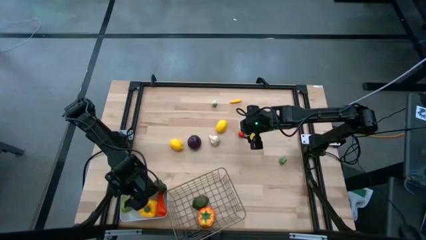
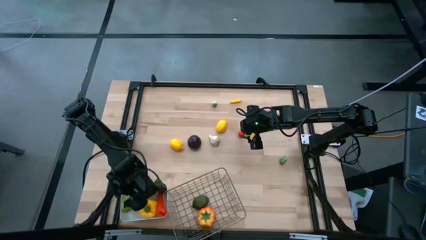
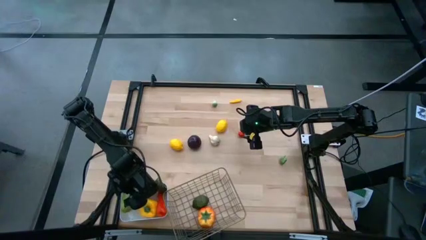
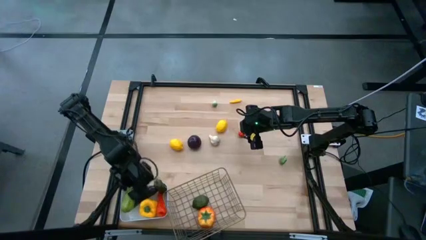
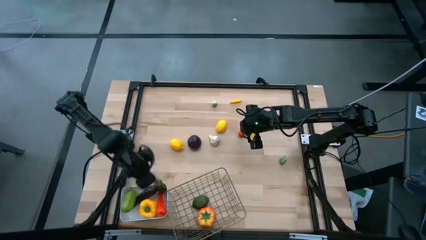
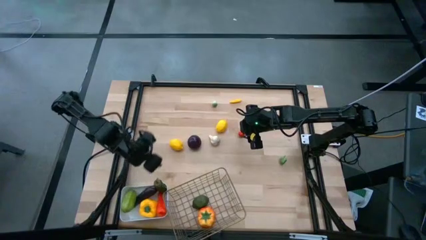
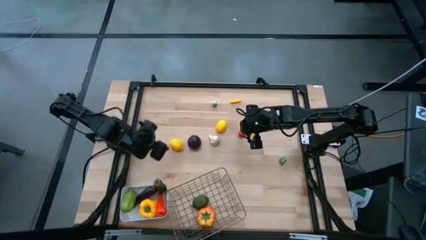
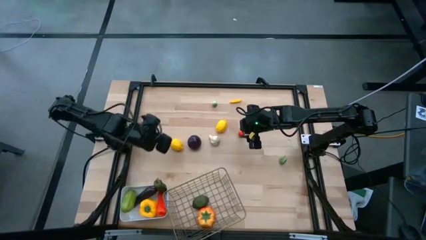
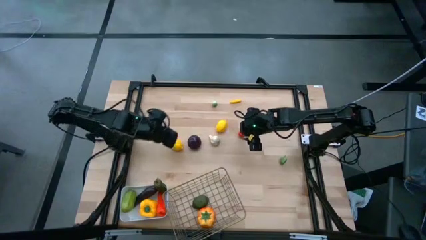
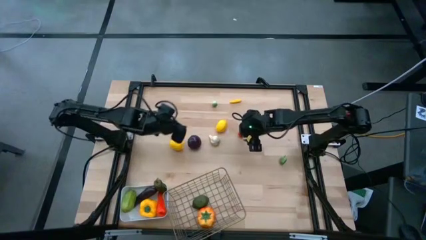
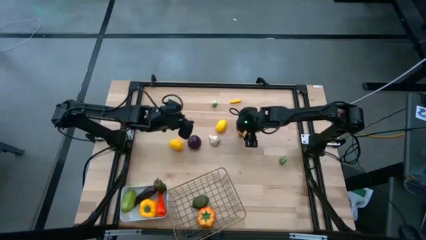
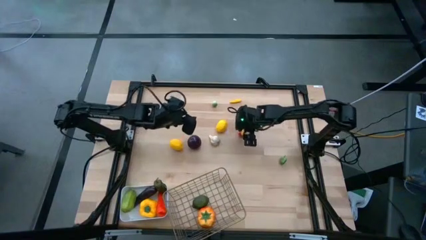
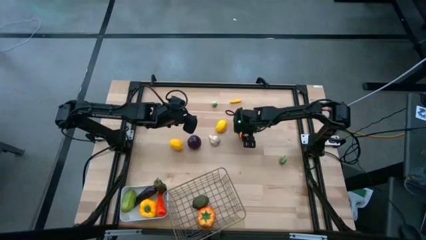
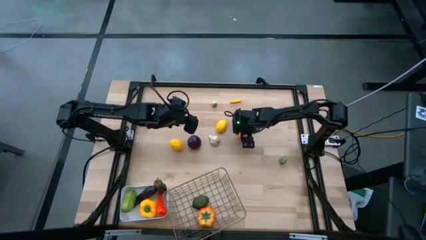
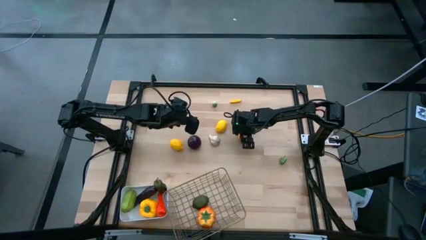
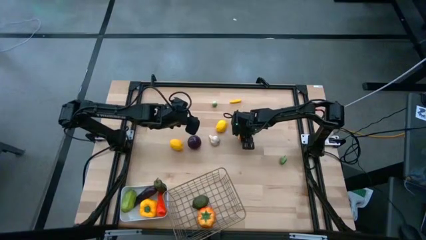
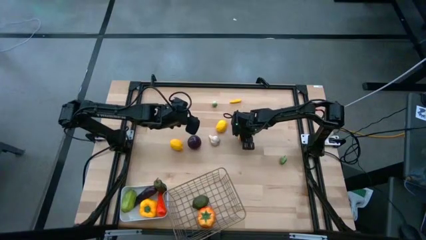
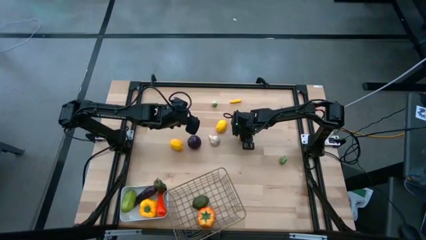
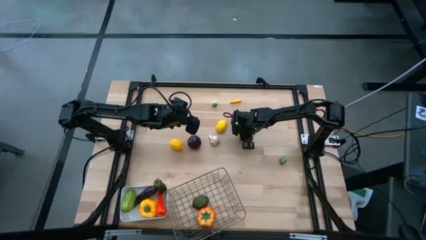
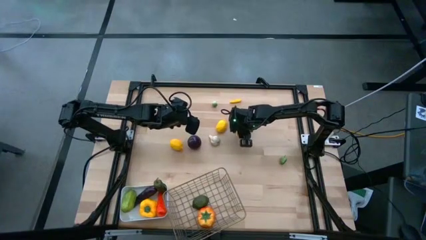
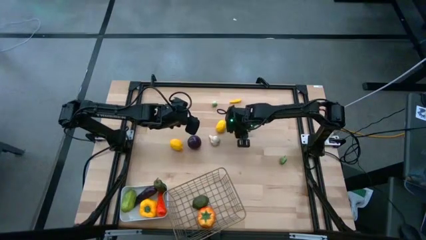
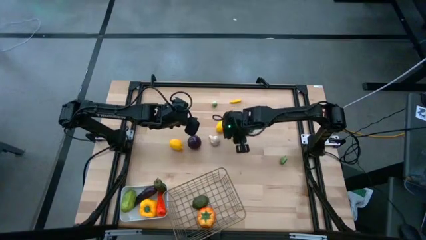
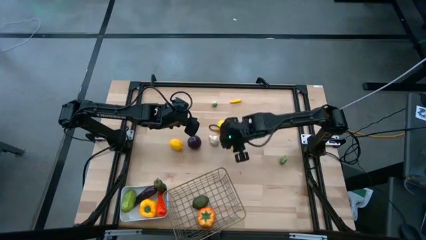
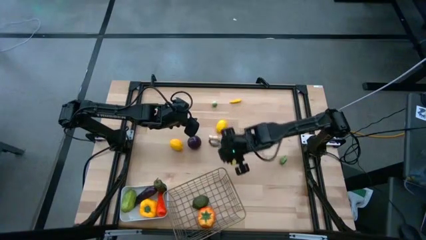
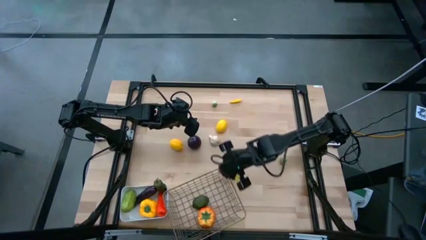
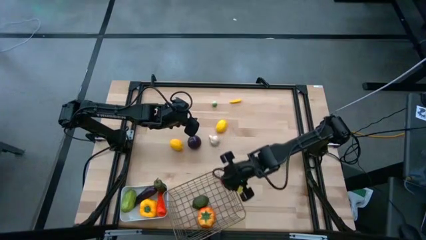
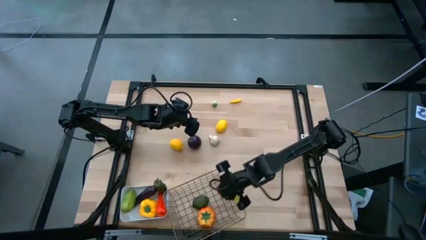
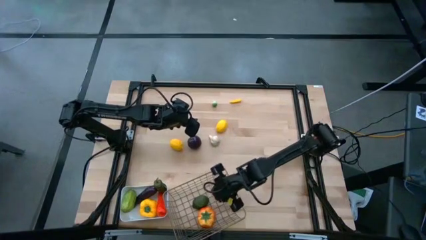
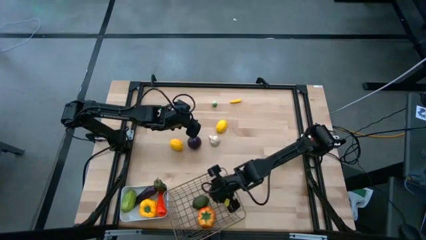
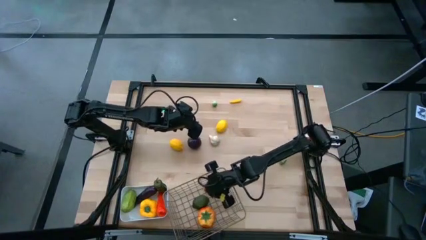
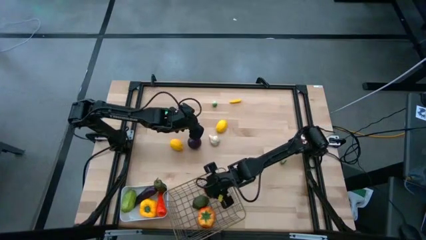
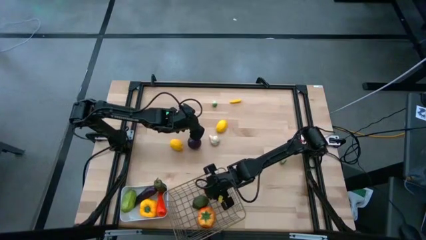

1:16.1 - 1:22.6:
Task: Sort produce into baskets
Put the orange tomato into the wire basket

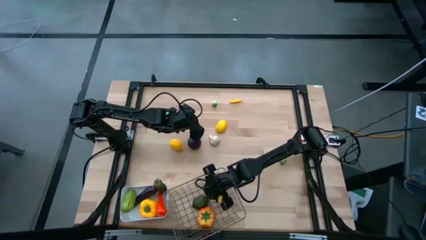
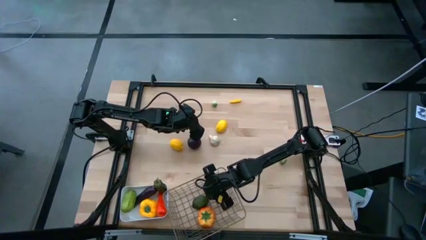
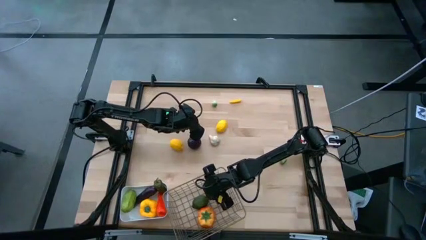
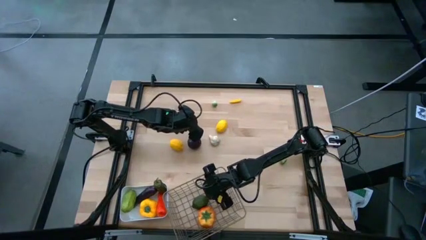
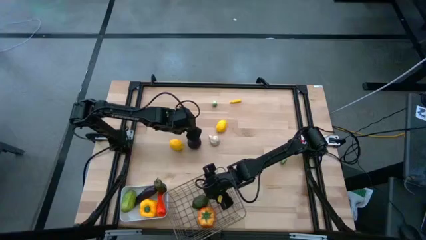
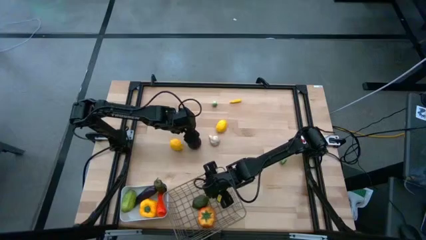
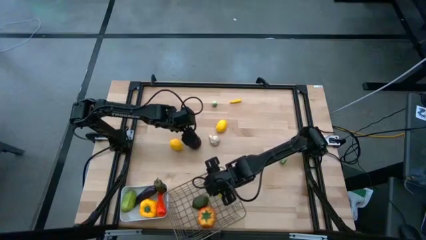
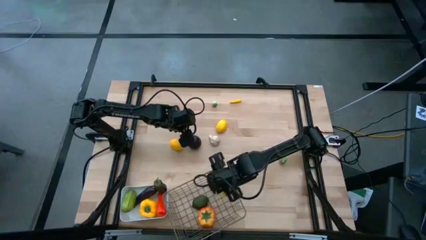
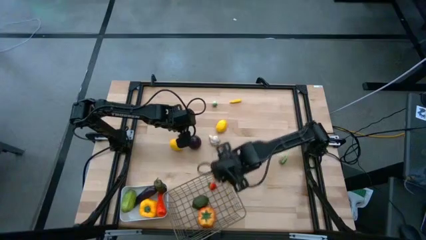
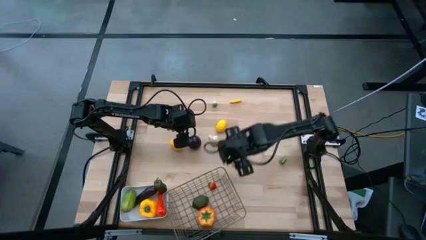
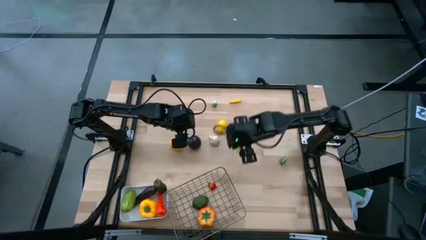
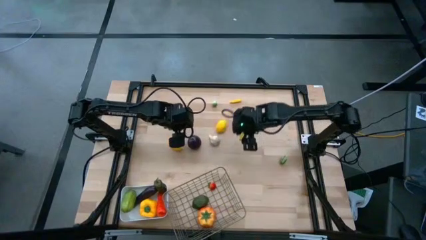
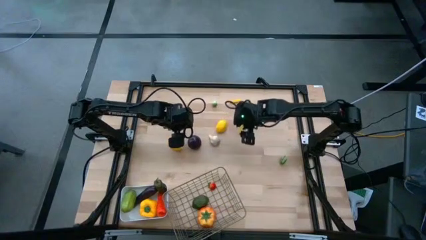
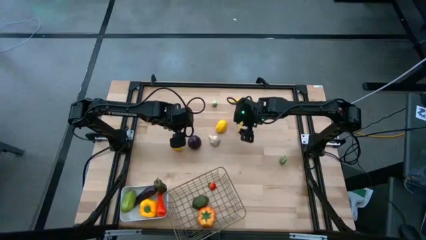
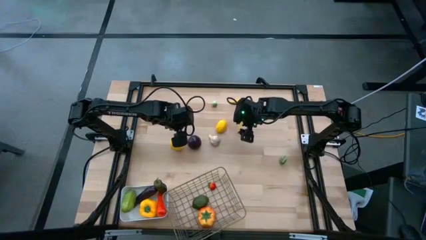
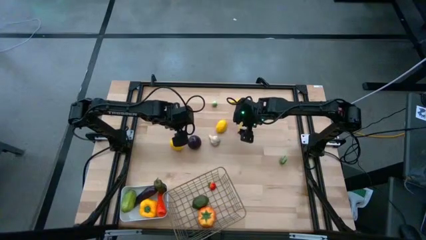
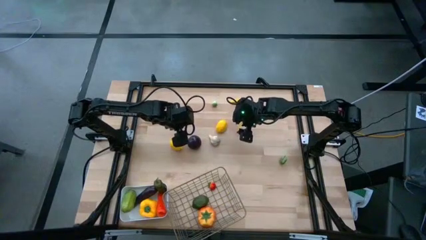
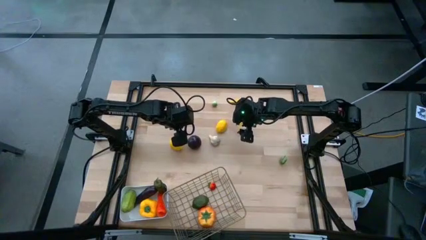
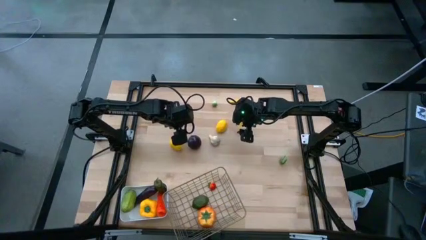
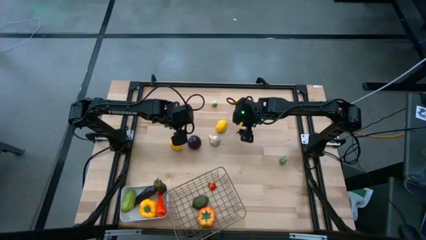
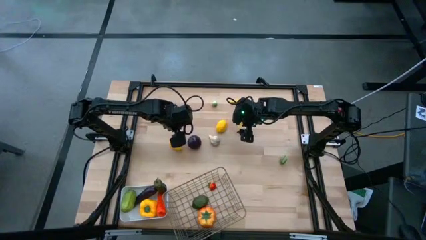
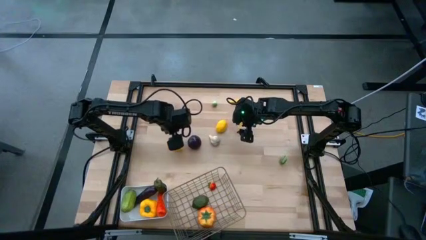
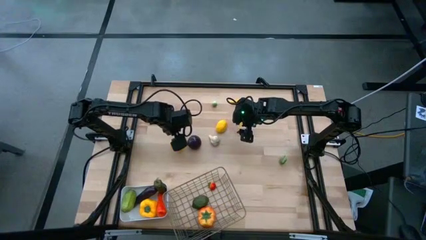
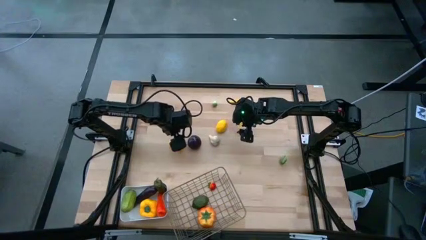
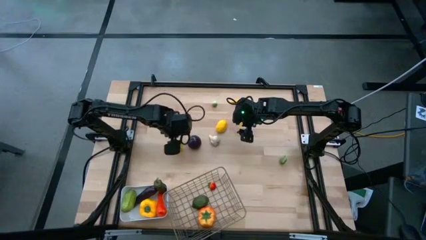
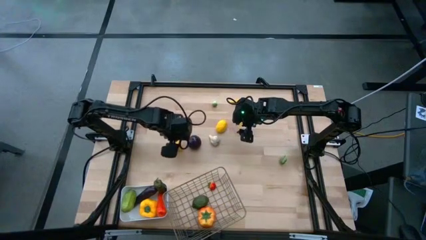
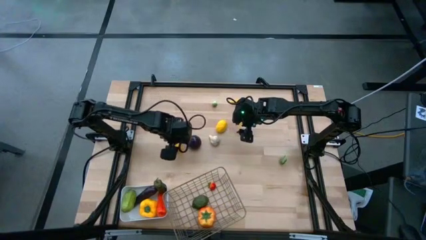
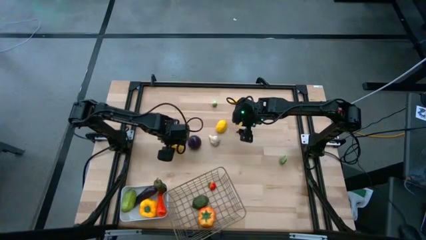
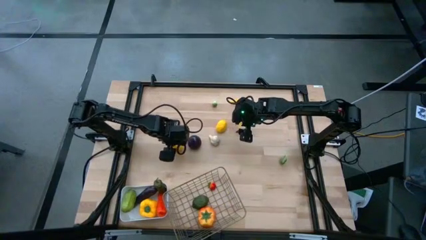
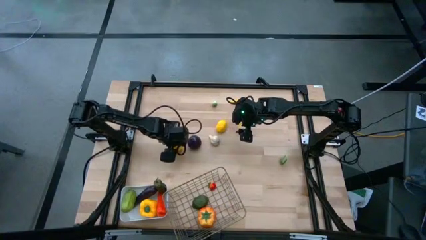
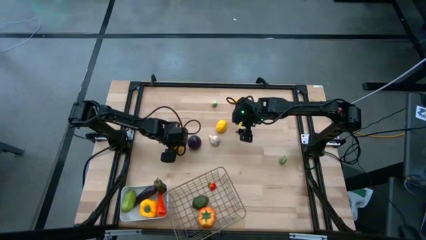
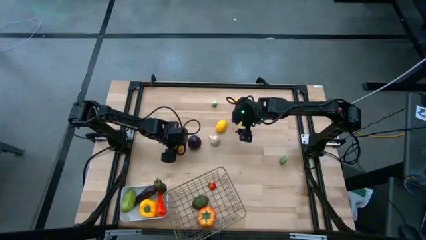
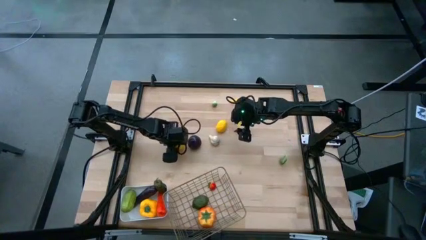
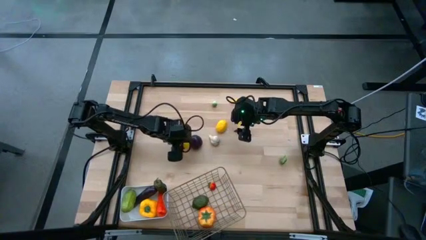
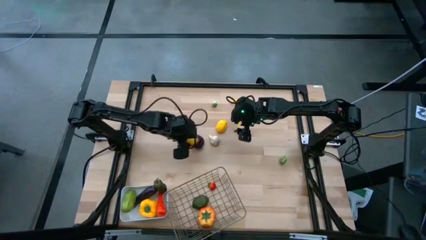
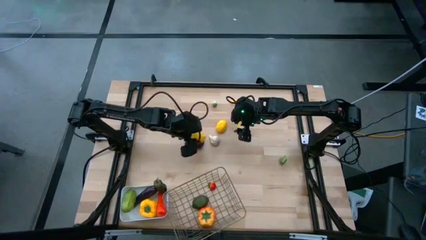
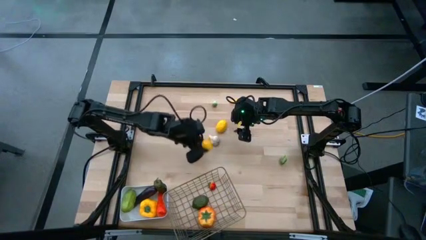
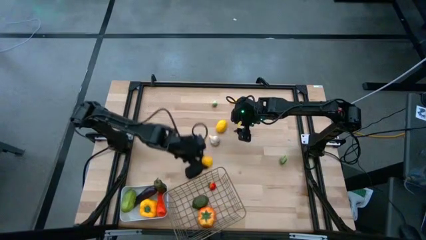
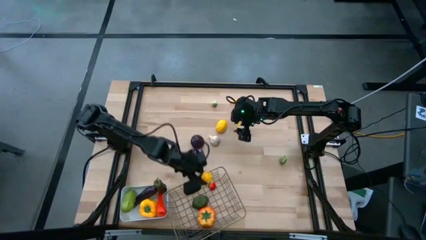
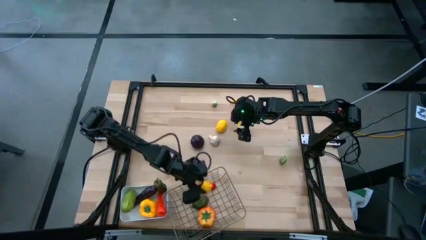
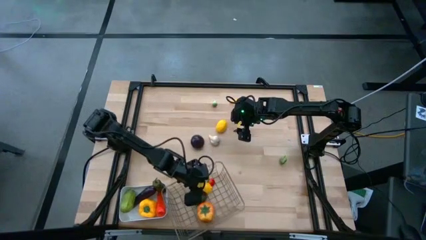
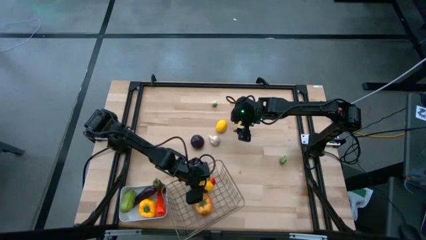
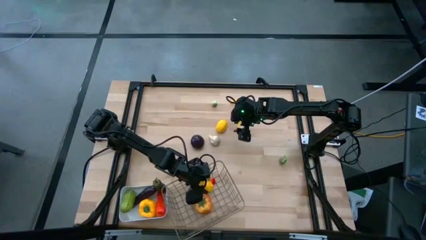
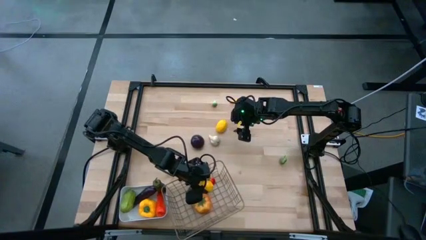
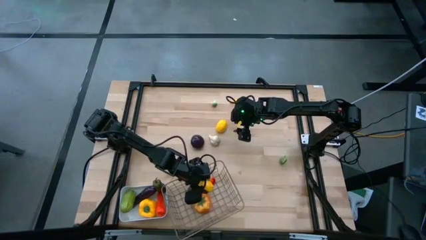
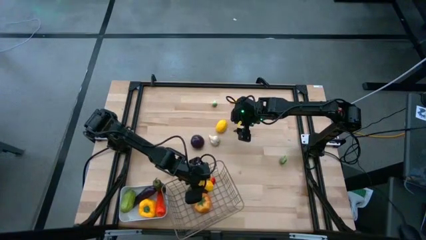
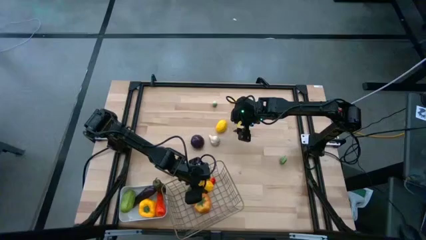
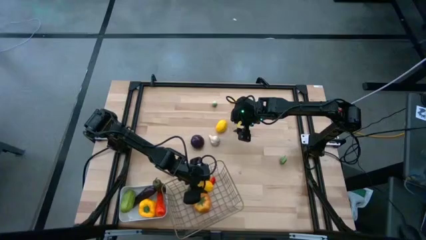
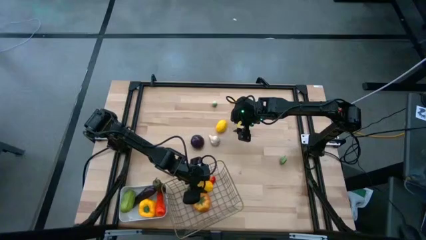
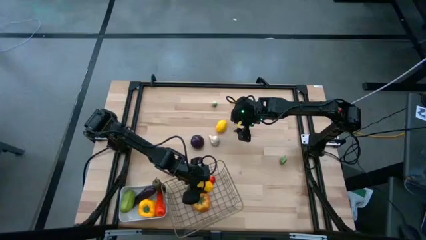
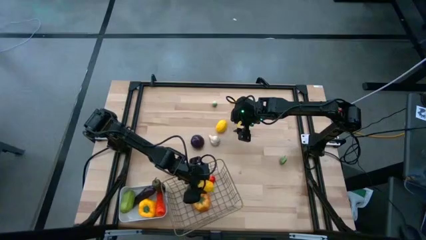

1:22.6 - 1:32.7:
Put the left yellow lemon into the wire basket

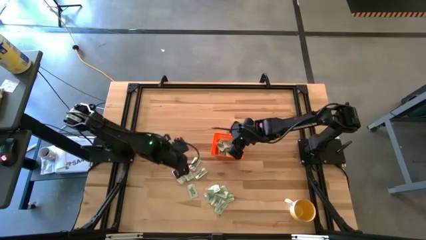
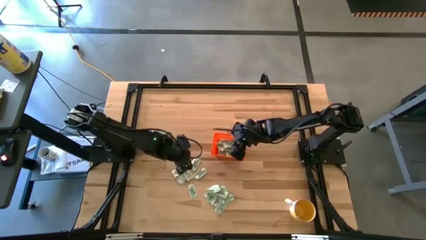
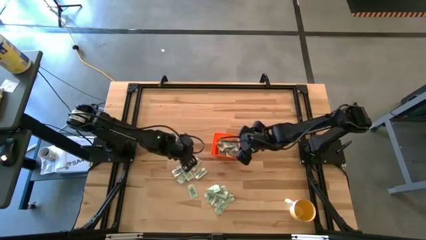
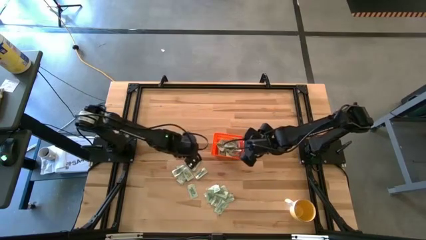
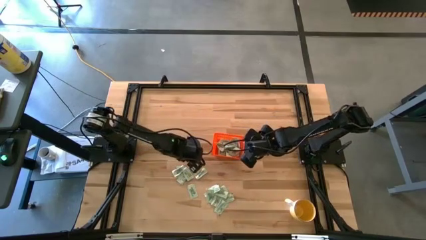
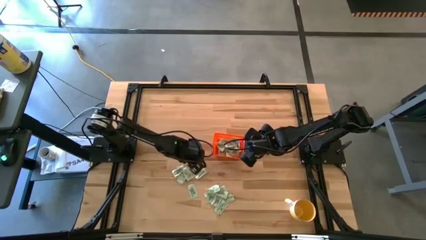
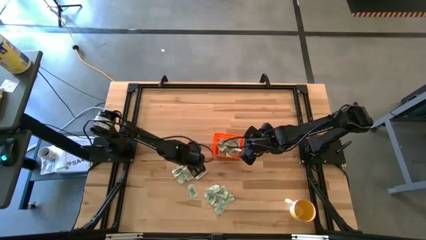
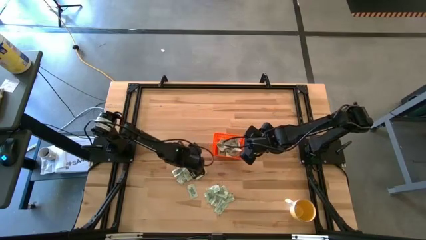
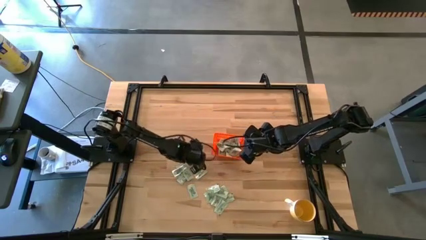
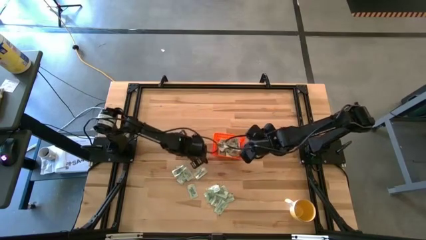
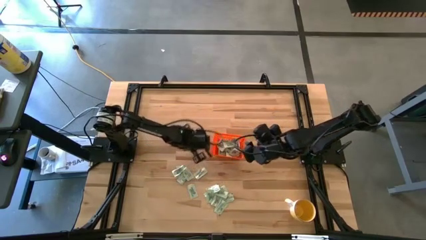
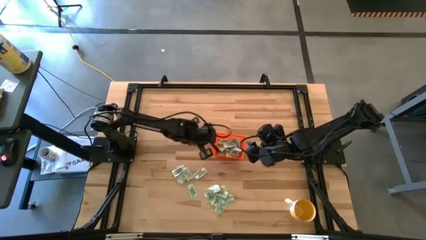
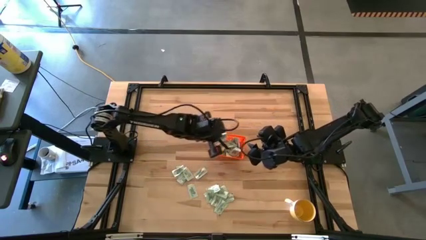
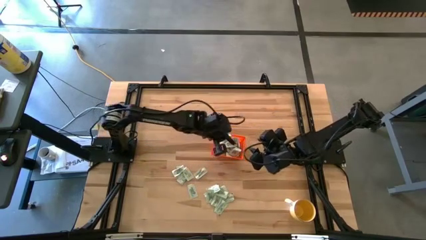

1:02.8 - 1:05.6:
Task: Pick and place Stevia / Truvia into bins
Put the white stevia packet into the orange bin
